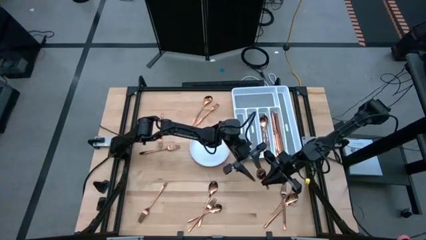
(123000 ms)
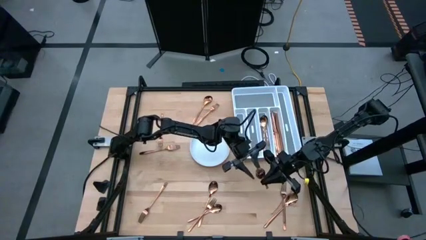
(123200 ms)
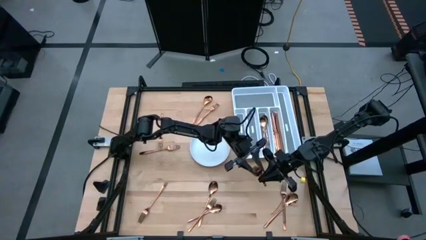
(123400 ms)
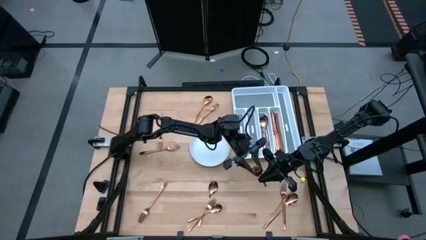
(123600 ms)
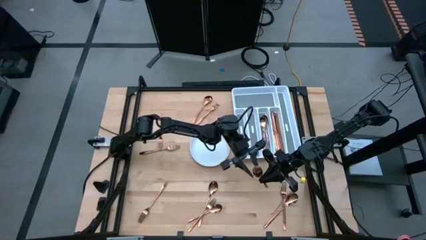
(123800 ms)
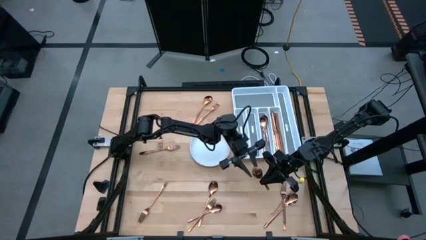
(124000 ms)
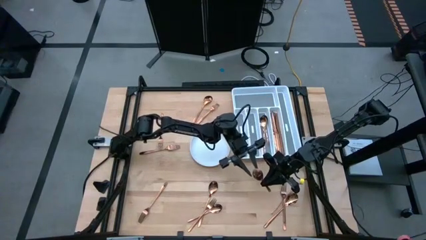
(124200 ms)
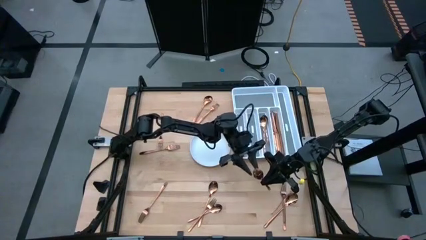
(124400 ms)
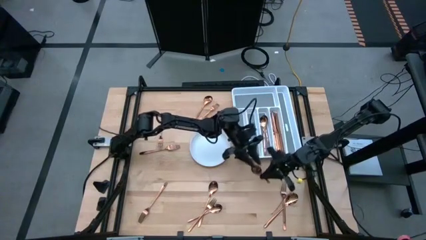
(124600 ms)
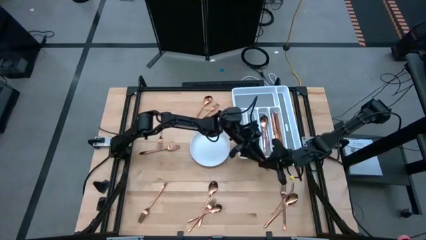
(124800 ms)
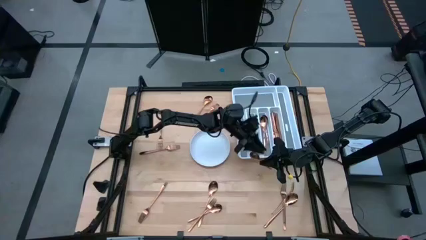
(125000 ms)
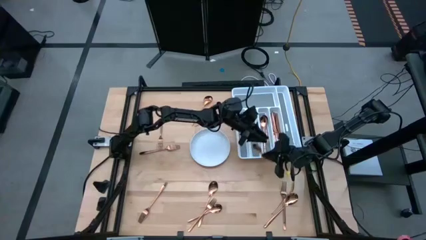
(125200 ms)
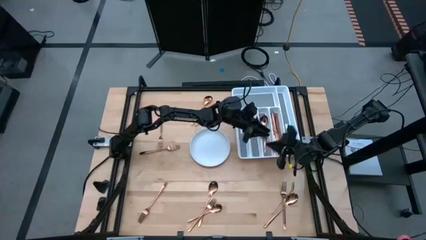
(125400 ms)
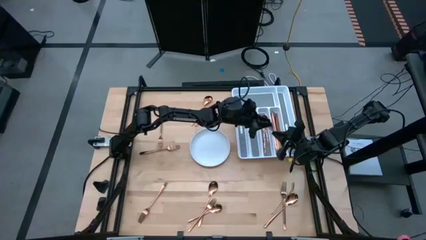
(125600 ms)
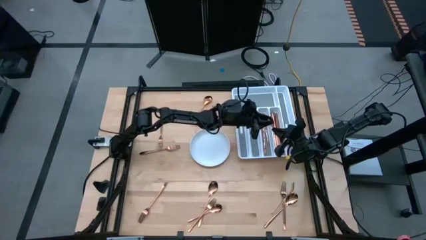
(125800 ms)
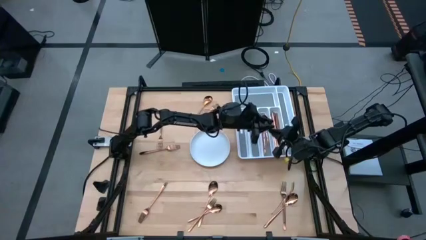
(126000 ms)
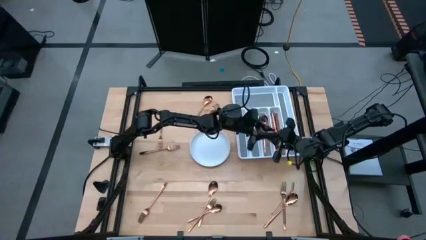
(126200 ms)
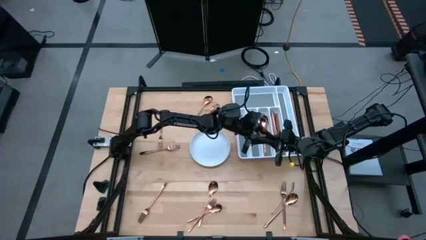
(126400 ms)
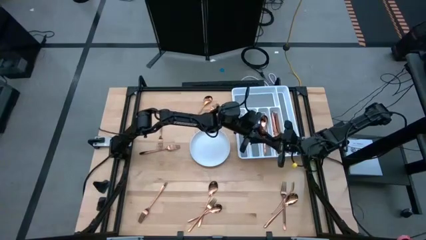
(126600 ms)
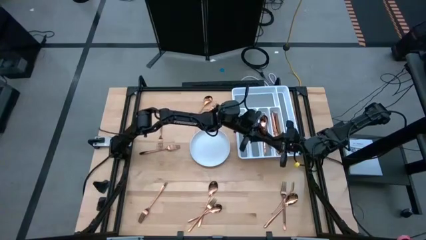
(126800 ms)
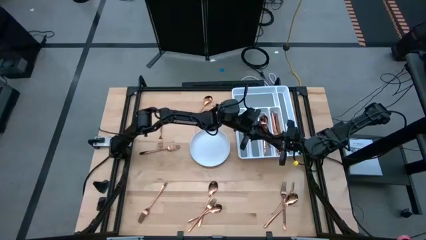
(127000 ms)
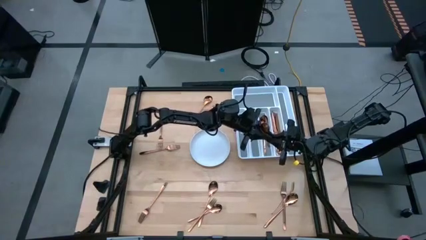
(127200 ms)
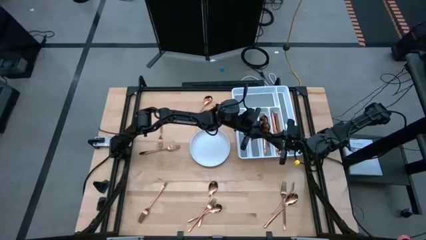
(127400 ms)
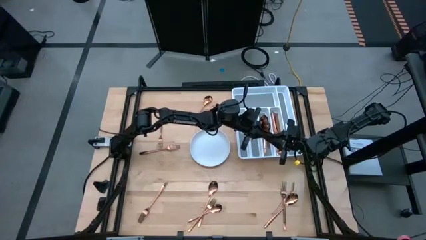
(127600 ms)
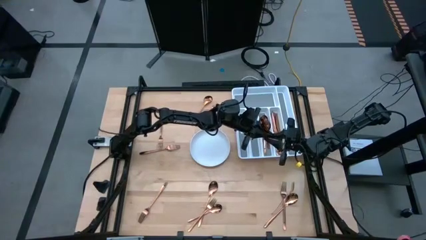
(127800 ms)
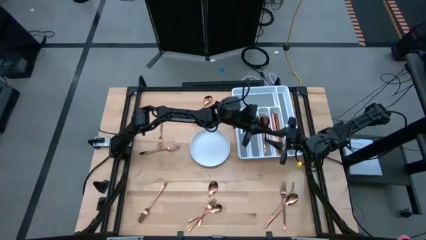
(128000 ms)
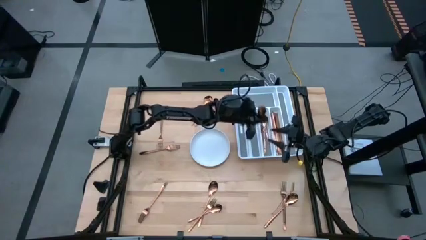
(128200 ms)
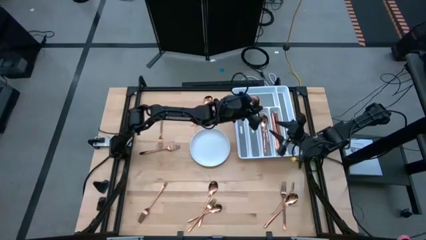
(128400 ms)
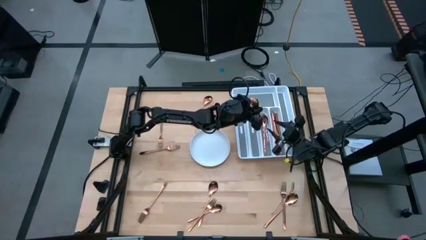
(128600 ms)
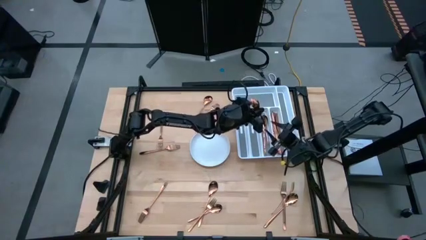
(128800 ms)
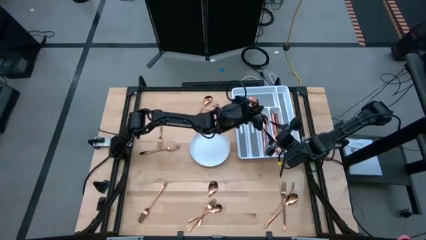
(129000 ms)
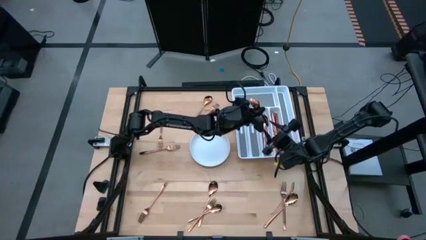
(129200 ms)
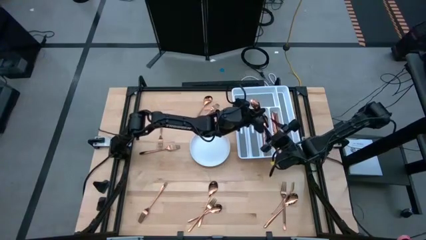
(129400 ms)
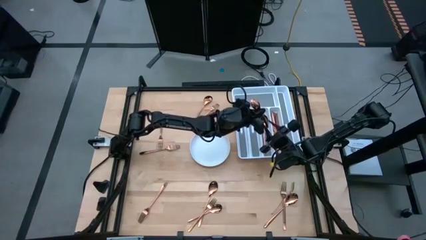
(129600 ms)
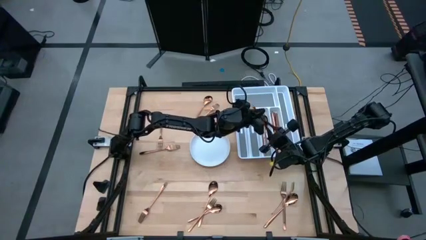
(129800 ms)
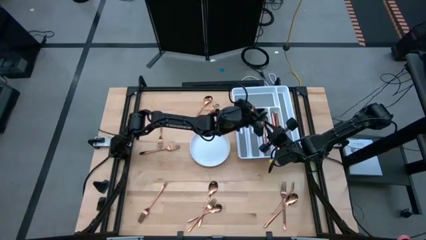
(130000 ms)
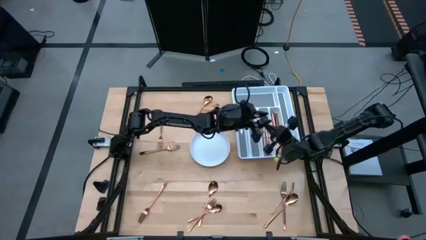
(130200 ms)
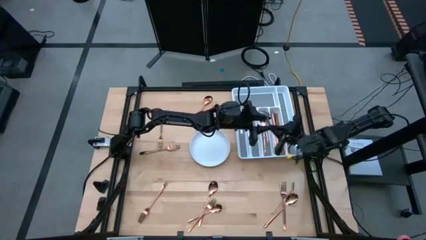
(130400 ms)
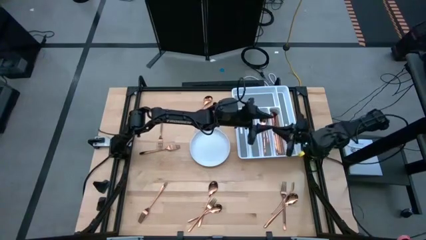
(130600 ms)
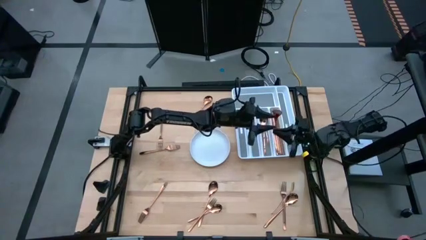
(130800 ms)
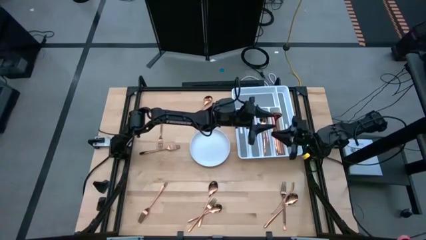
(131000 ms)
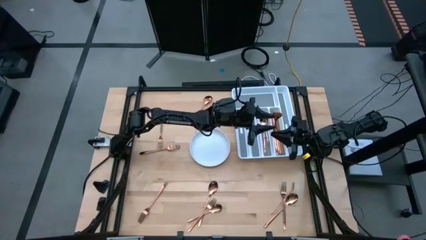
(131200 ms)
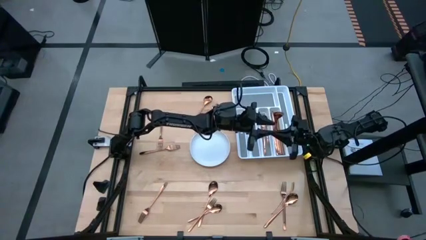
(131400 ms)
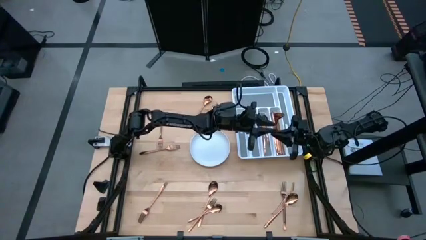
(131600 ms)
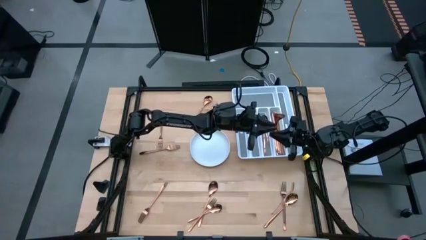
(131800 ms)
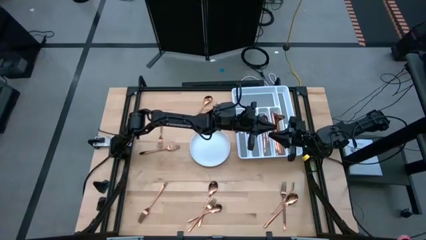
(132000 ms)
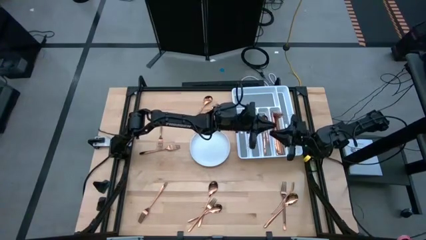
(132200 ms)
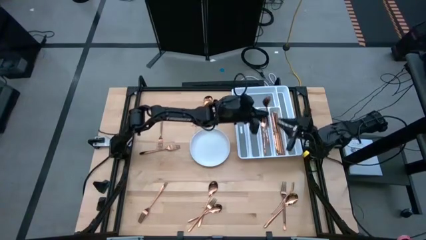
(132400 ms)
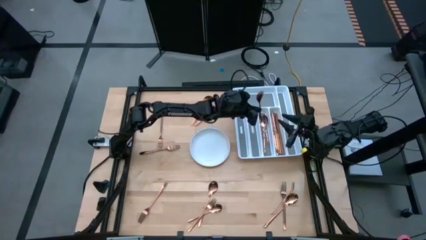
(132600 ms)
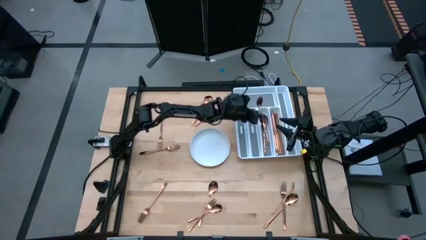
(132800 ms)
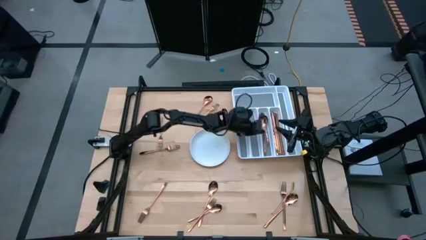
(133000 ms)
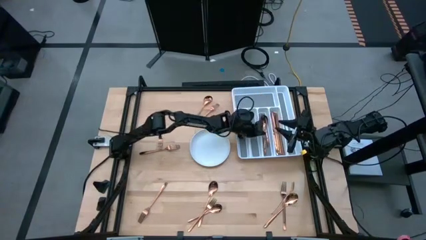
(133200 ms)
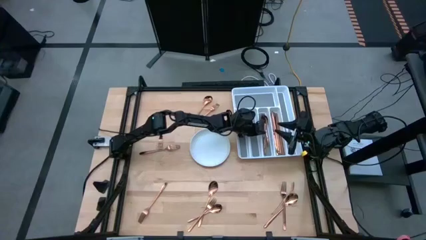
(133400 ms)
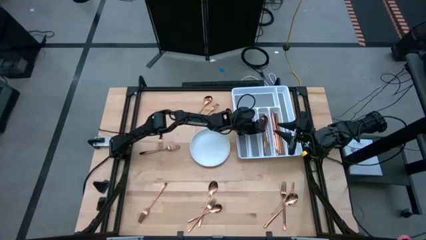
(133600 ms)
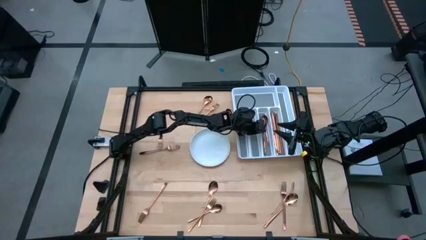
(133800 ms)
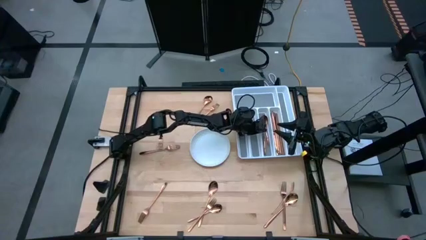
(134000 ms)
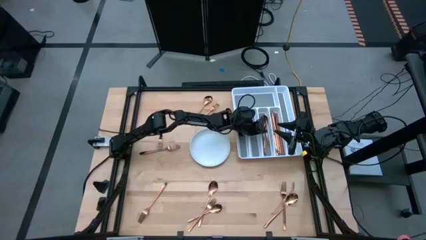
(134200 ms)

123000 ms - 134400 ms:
Task: Sort silverware
Put the spoon in the silverware tray

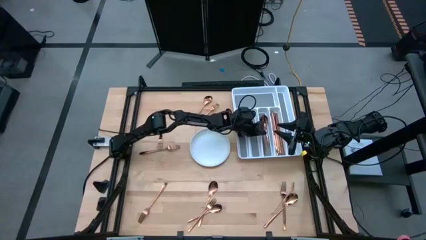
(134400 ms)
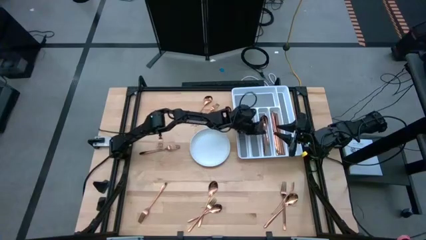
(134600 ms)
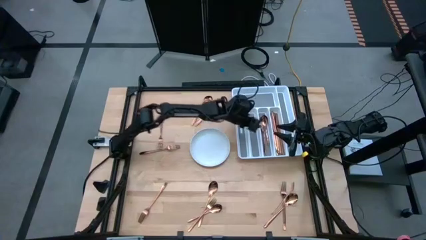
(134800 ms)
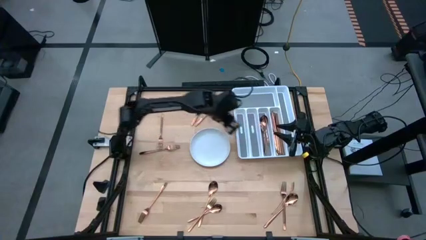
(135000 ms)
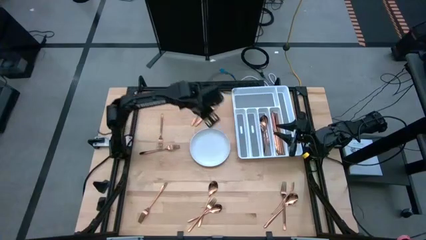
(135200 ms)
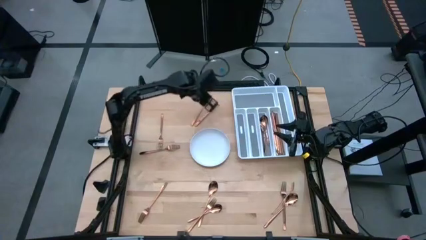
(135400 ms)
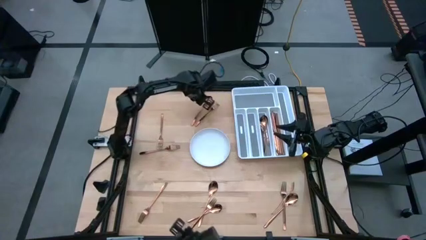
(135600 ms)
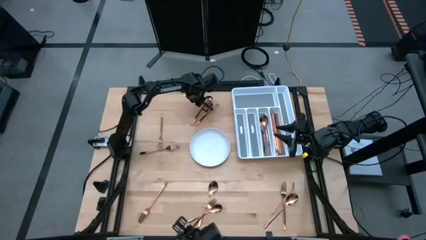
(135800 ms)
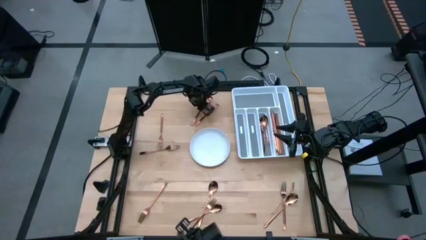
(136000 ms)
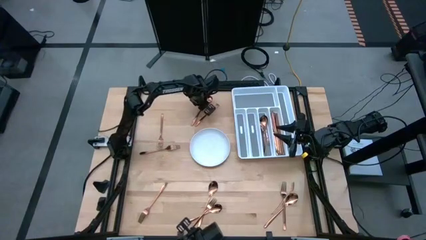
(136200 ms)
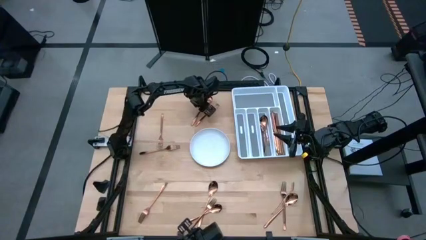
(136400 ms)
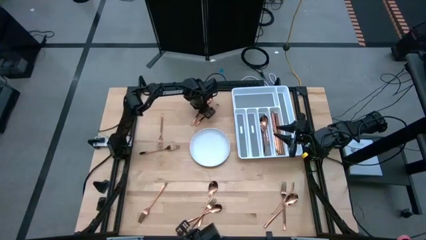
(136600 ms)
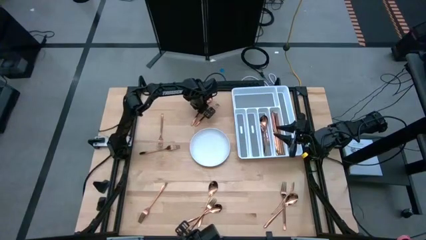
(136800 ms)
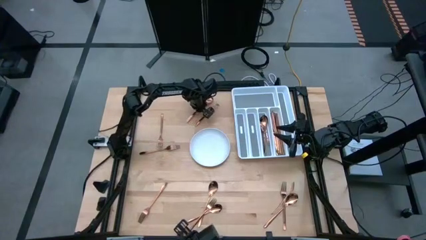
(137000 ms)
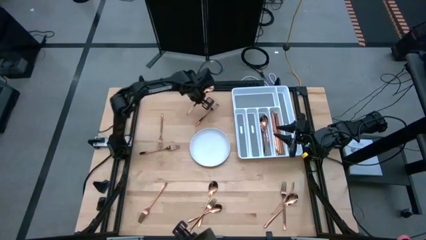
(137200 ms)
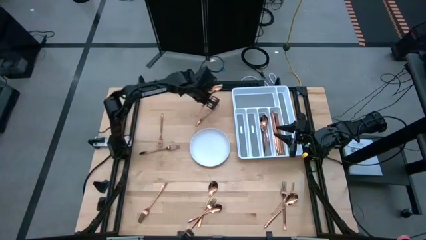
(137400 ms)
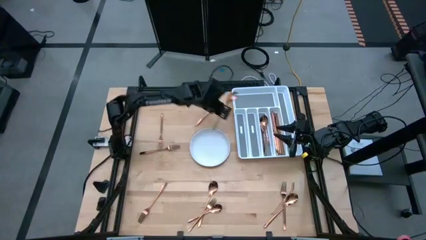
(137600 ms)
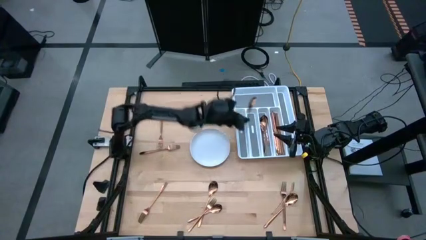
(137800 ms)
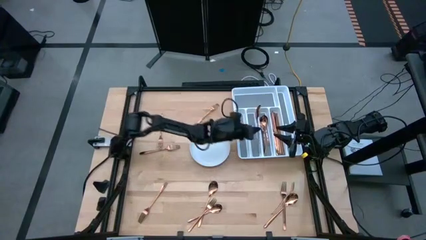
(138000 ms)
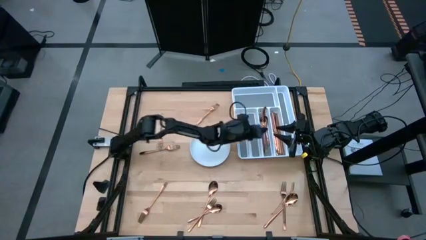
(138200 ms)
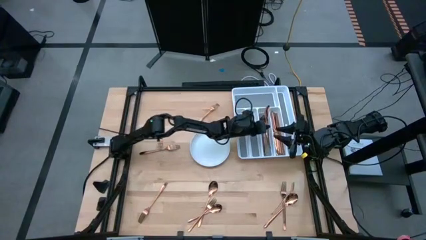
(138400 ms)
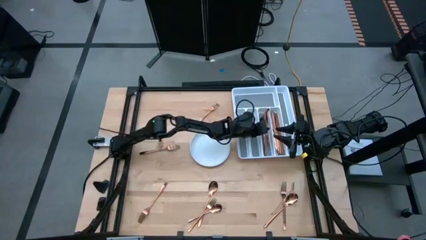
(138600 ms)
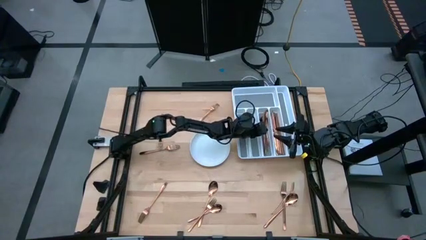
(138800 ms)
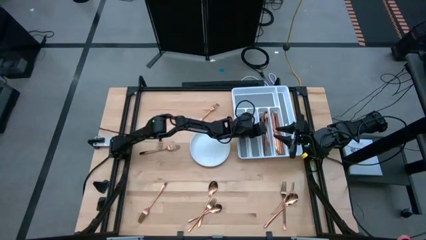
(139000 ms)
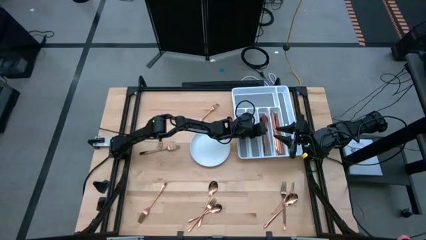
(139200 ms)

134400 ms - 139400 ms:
Put the spoon in the silverware tray
